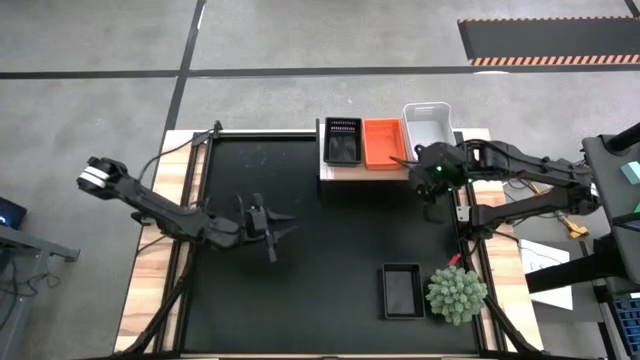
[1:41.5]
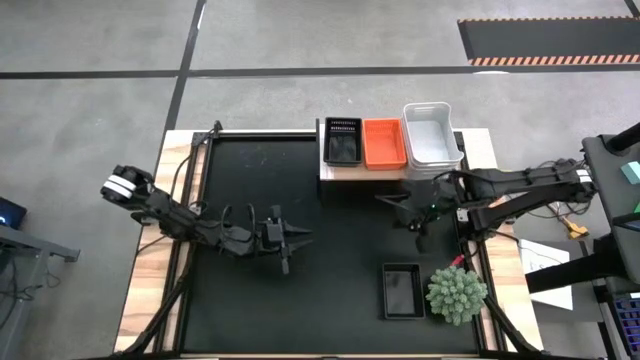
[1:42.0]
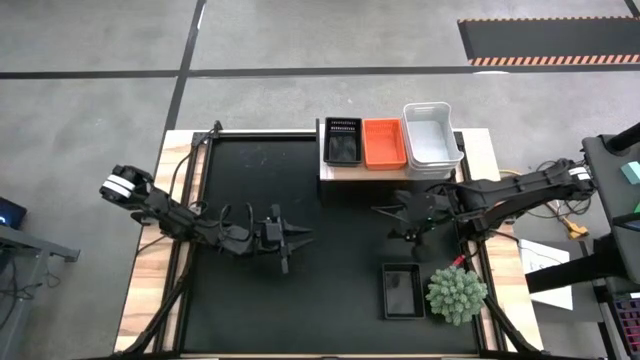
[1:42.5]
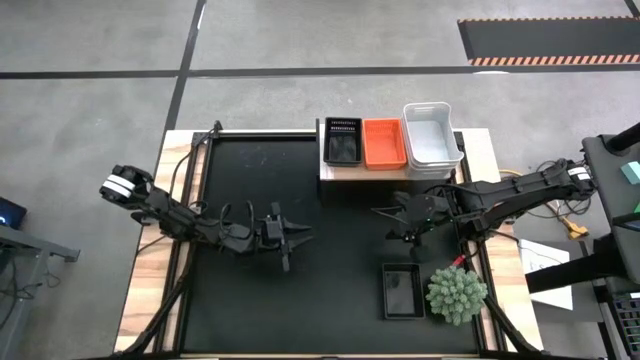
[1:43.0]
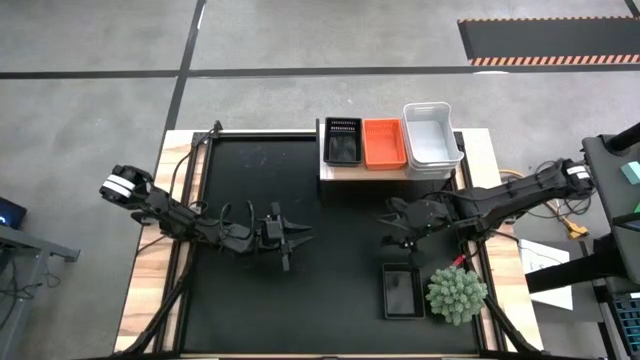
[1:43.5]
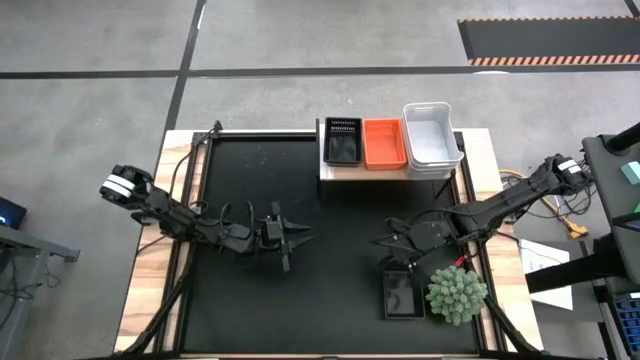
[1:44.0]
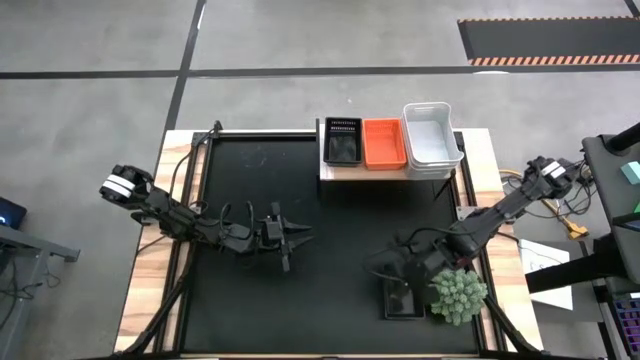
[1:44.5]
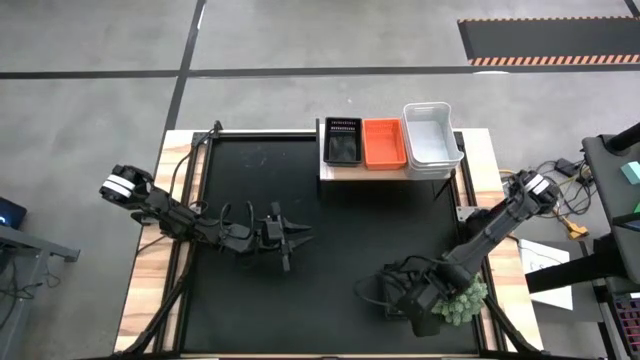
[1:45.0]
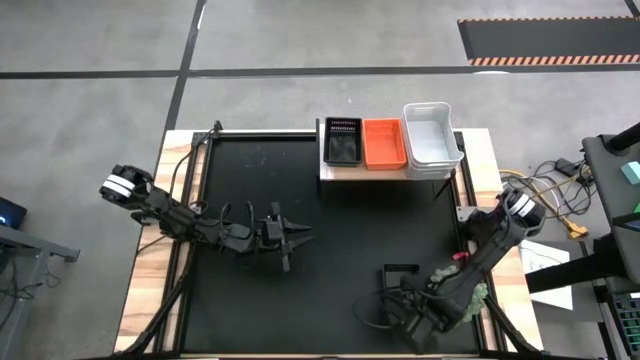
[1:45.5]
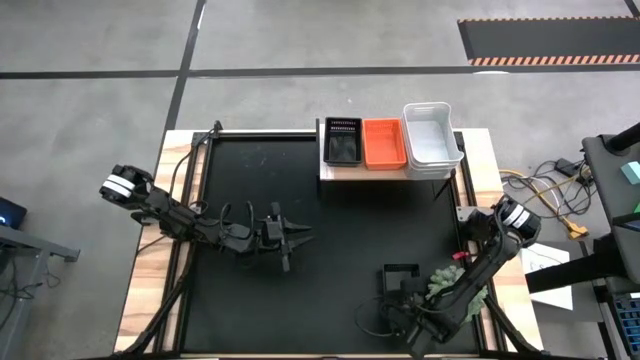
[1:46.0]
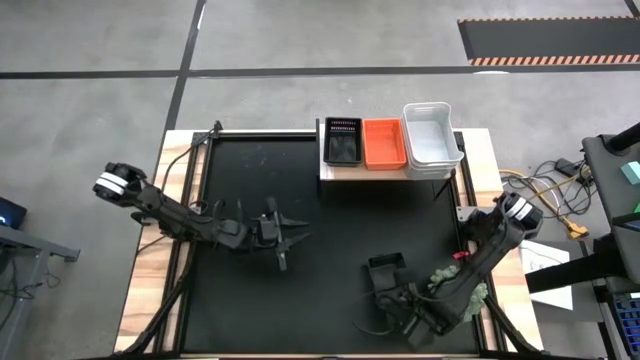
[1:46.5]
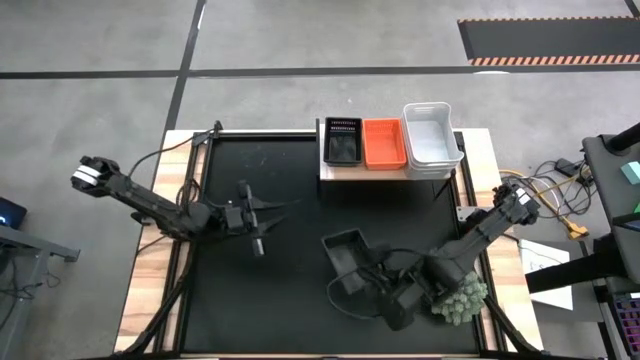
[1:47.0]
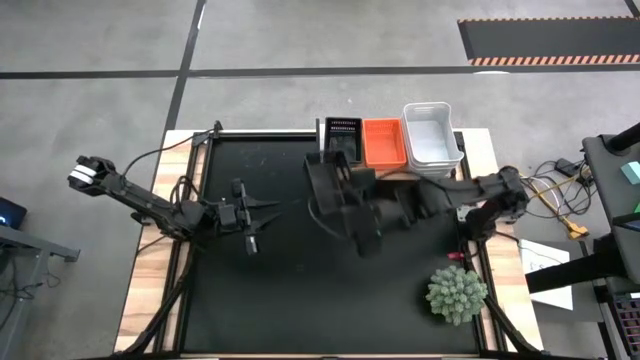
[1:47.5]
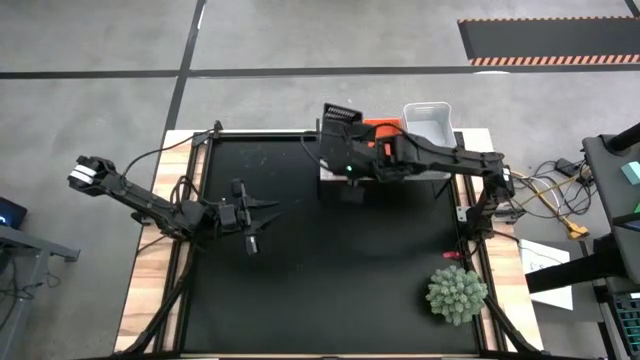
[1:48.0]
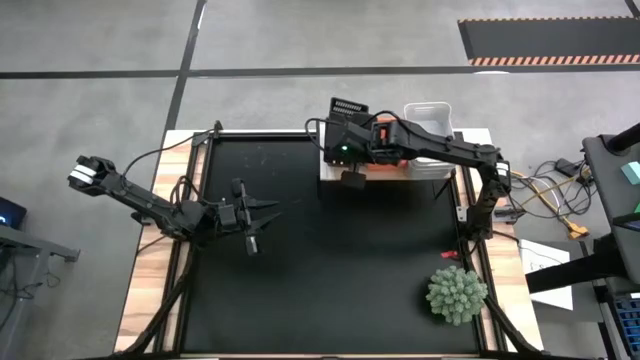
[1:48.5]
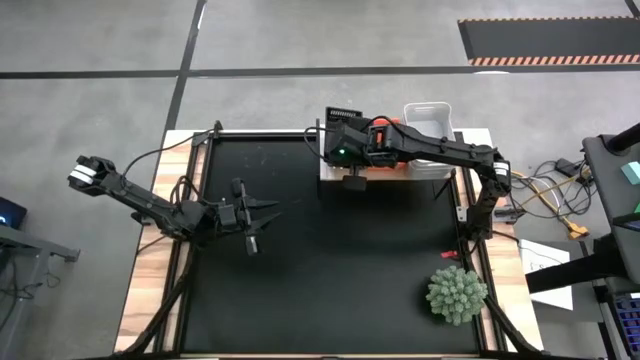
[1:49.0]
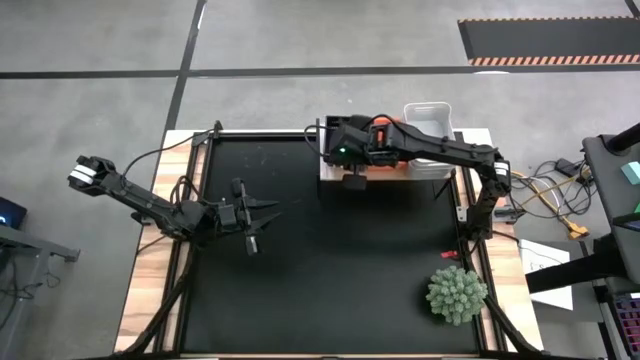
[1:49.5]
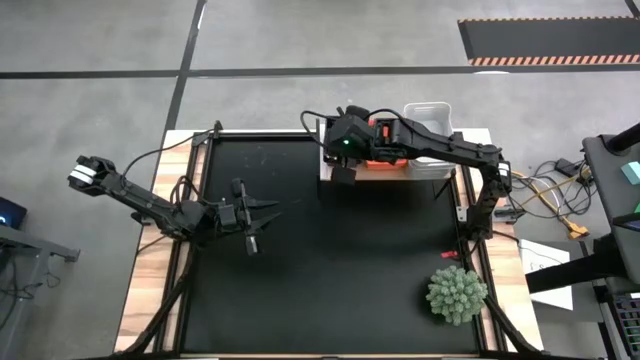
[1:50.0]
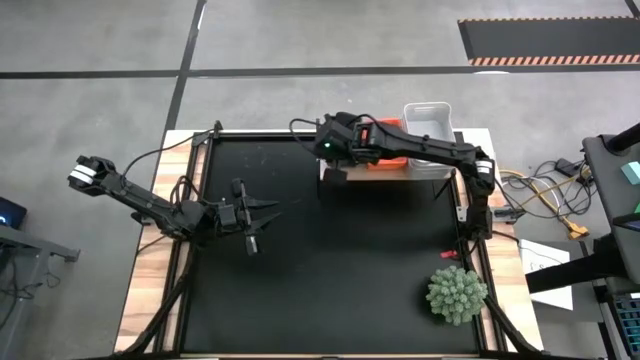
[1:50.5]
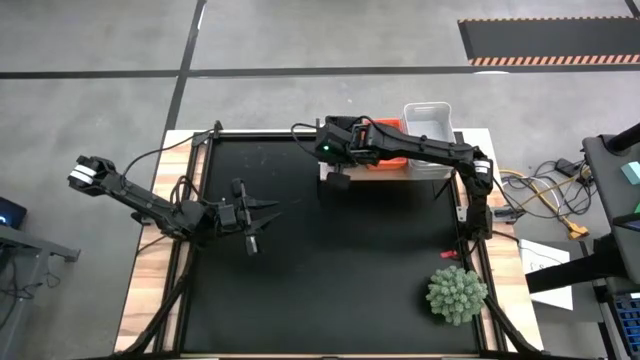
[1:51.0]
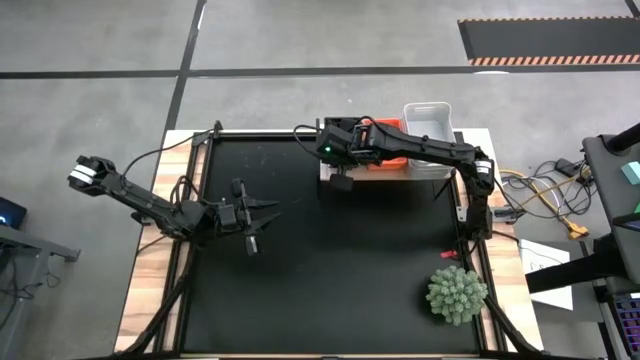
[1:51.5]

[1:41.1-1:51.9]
Stack the black basket on the black basket on the shelf

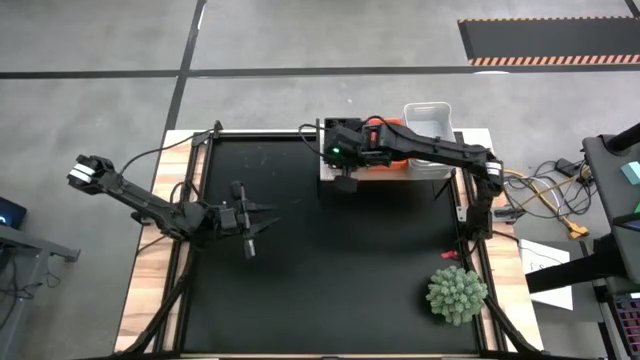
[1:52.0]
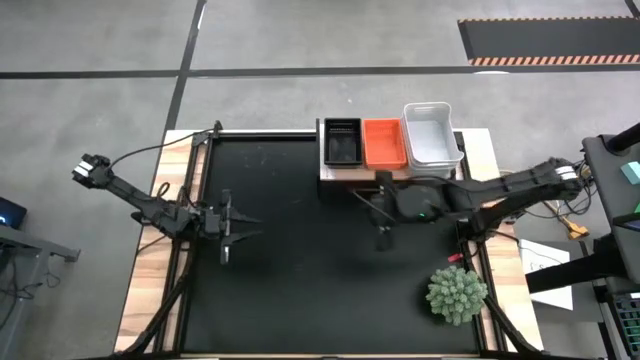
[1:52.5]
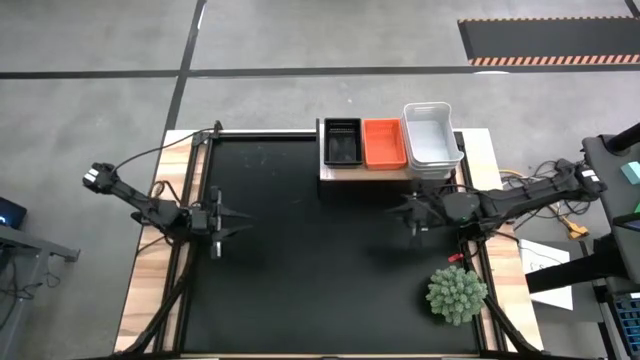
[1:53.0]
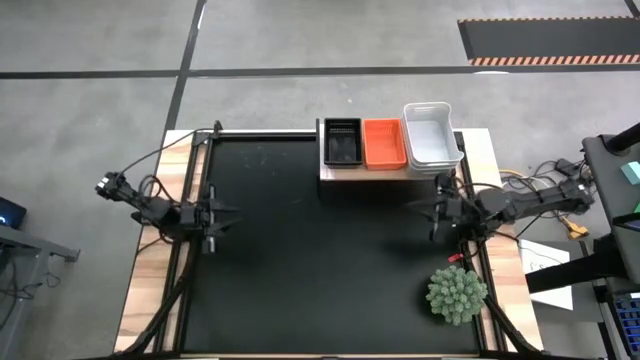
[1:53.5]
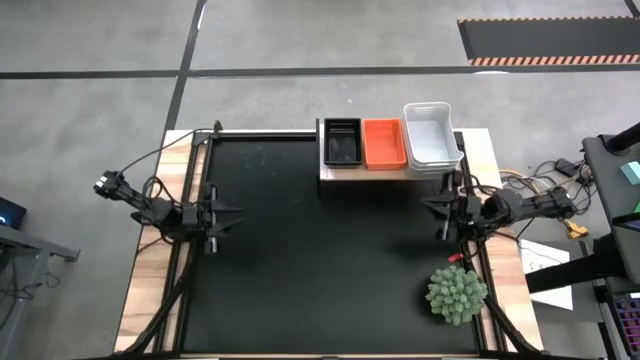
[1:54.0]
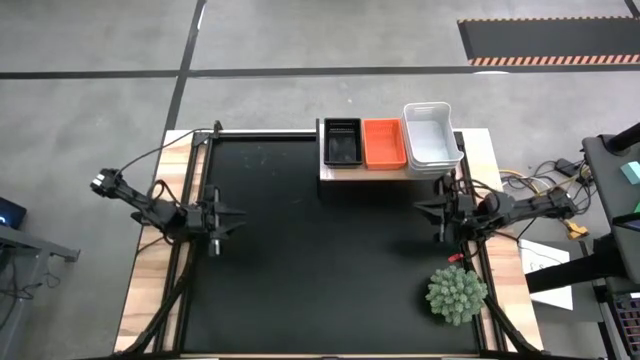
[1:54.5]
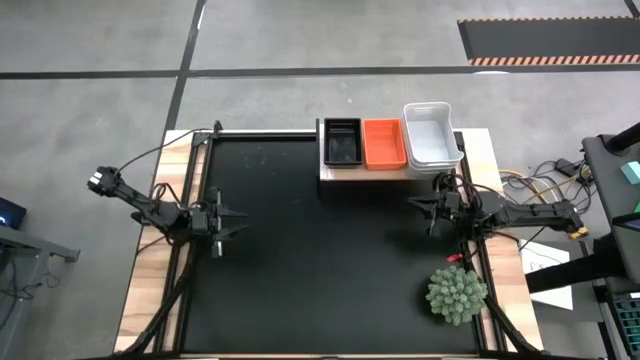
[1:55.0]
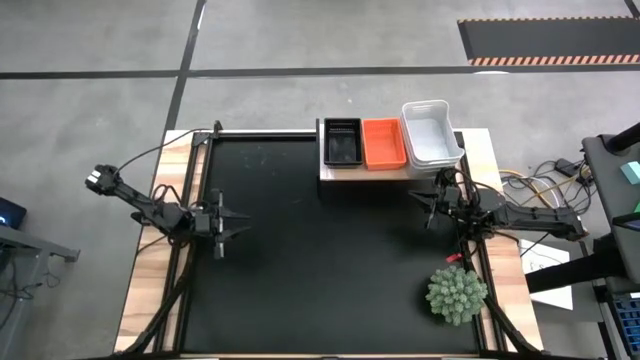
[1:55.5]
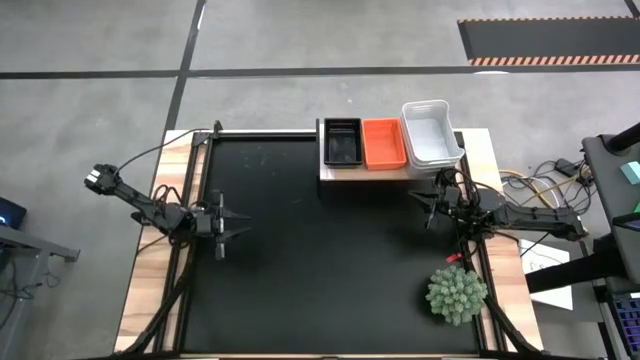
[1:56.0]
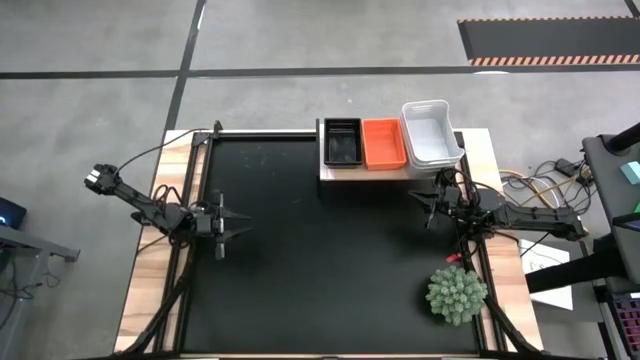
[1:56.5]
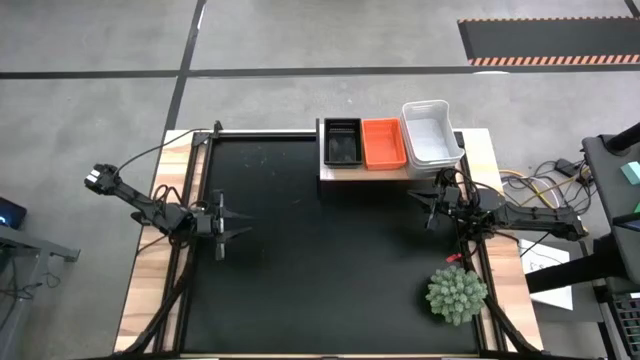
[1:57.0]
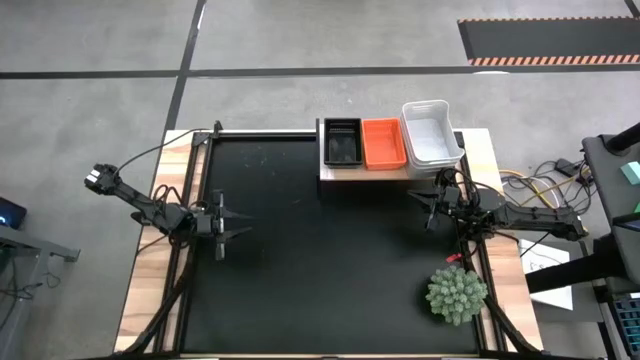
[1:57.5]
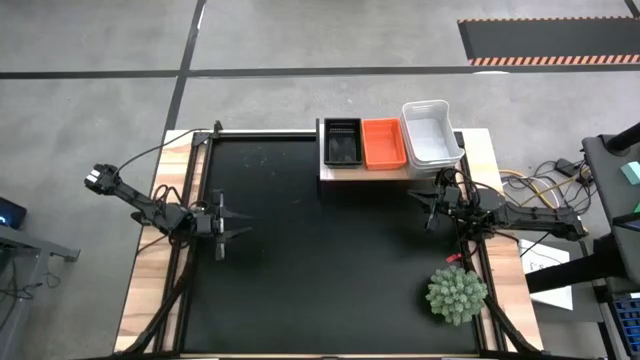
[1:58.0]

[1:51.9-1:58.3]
Return to Home Position

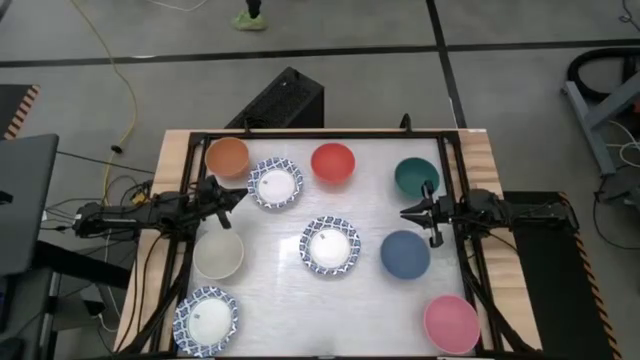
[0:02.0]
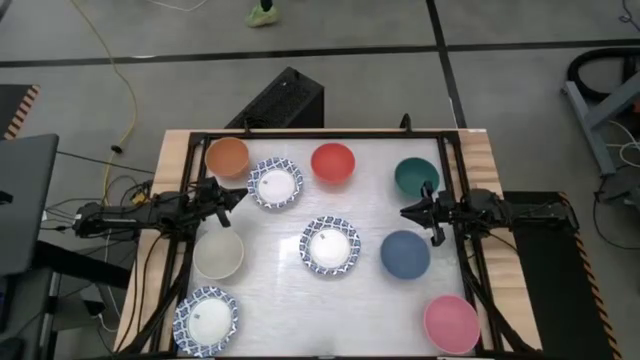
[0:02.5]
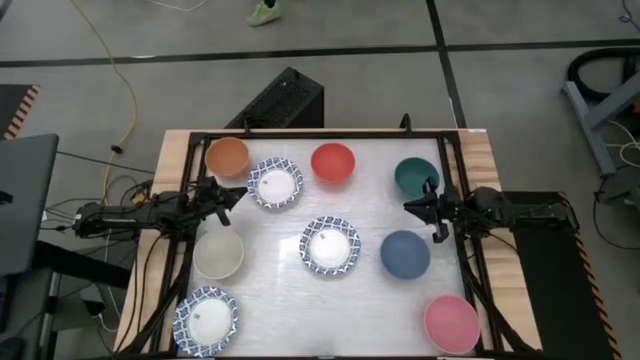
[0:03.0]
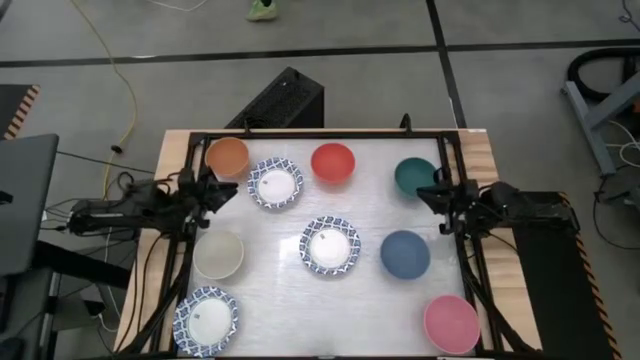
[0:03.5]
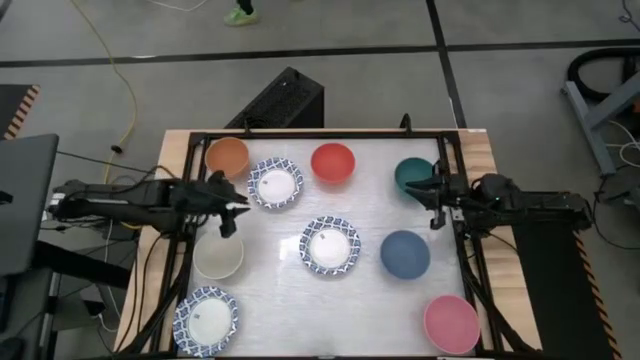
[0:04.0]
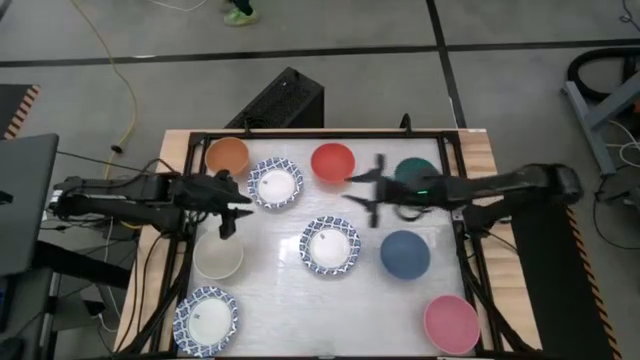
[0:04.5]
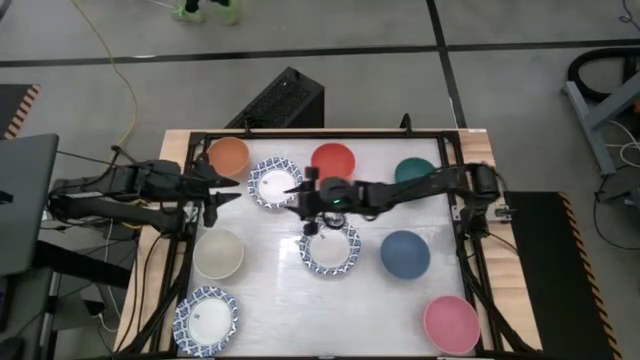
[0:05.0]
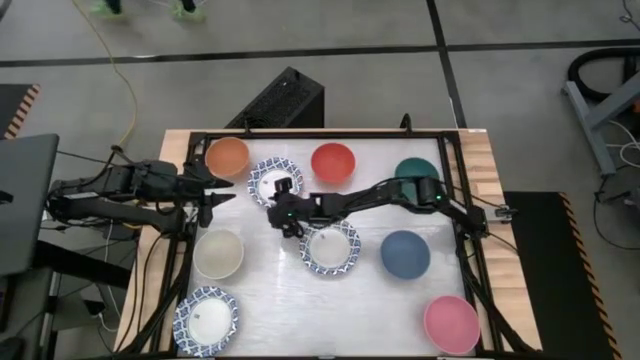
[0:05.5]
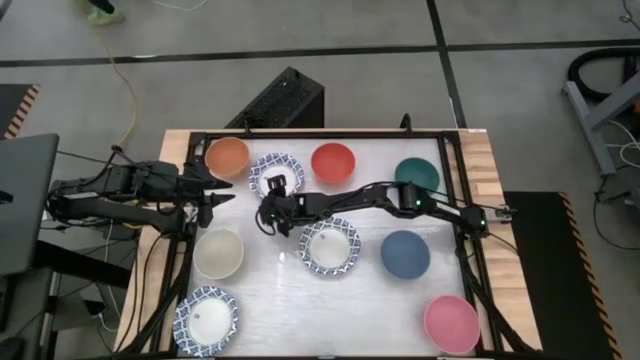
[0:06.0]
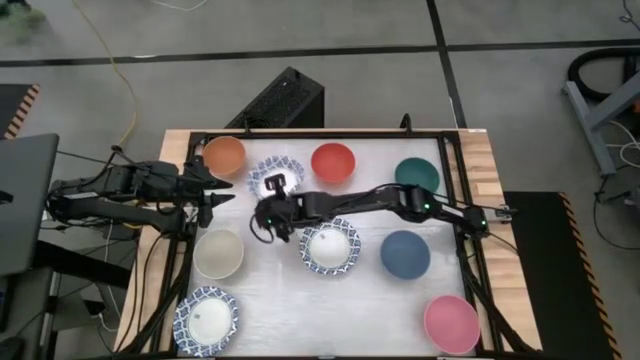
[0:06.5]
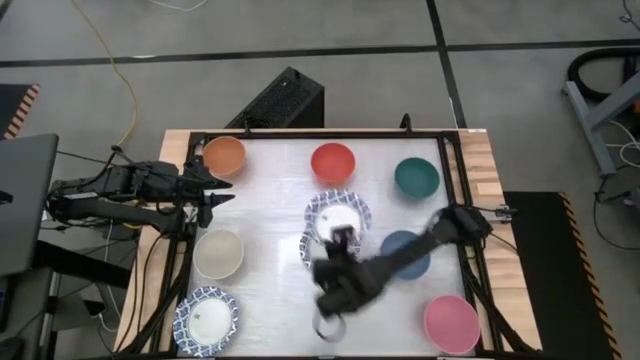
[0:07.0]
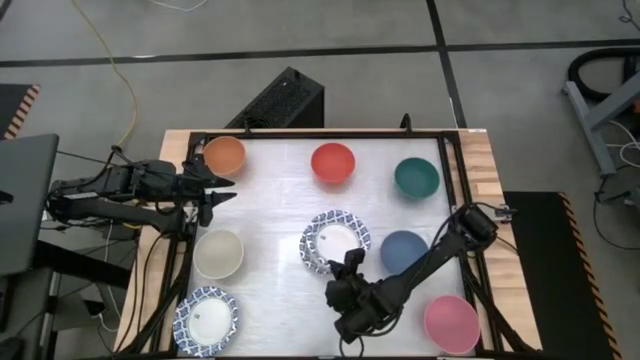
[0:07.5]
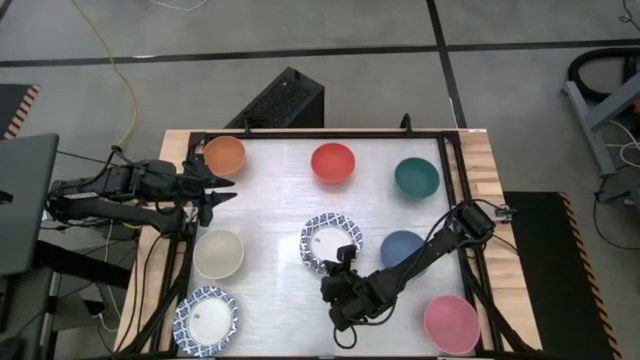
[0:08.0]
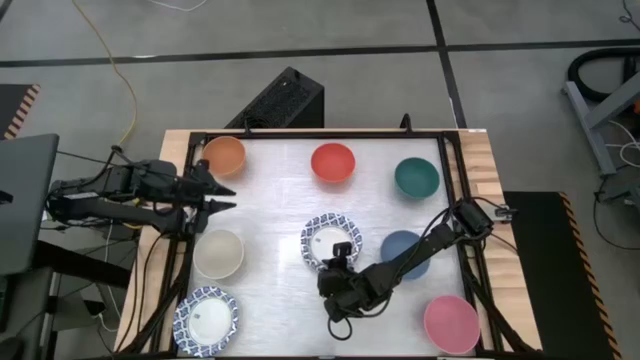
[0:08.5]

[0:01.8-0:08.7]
Stack the top white pattern bowl into the middle white pattern bowl
